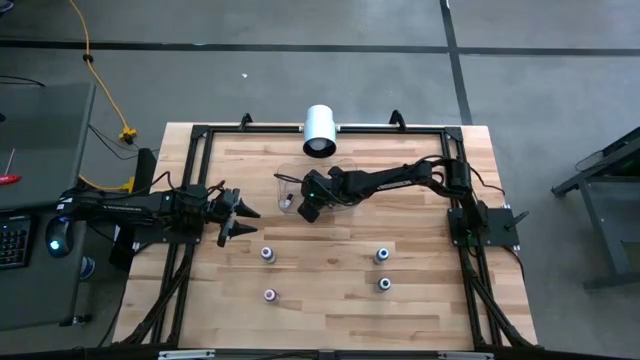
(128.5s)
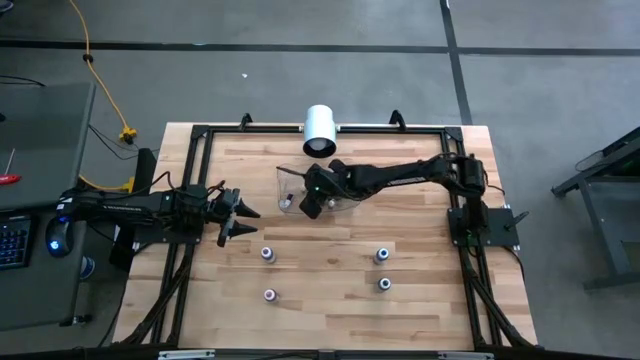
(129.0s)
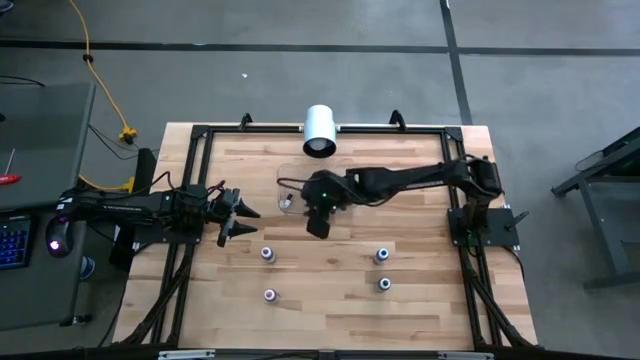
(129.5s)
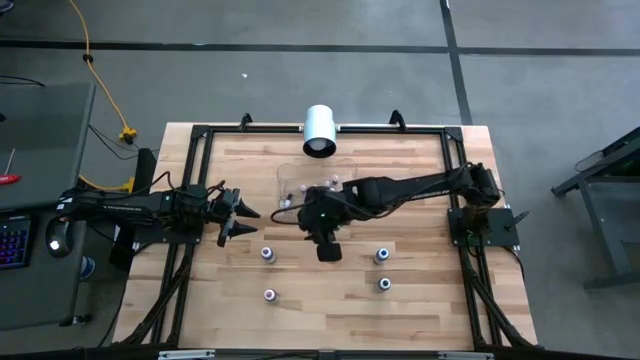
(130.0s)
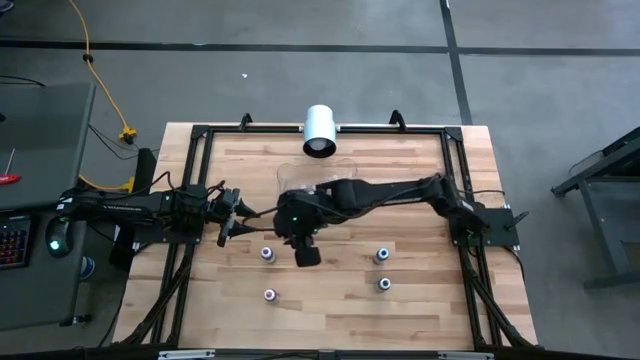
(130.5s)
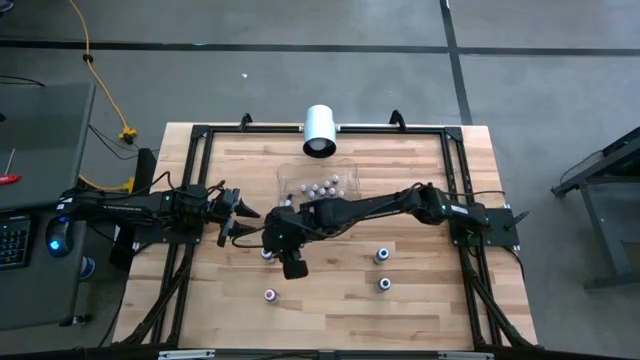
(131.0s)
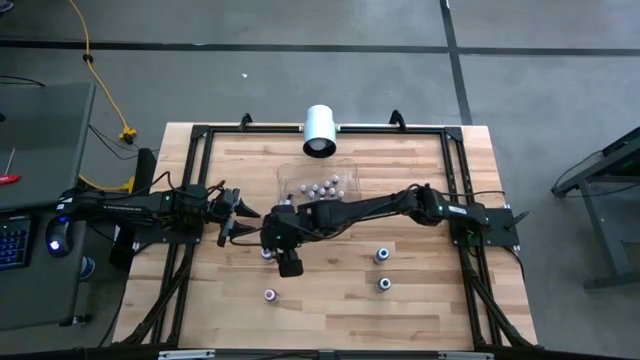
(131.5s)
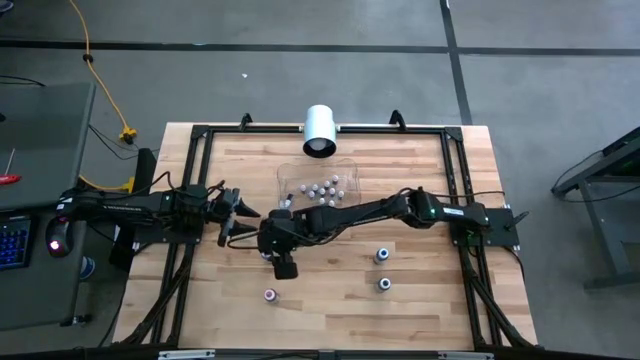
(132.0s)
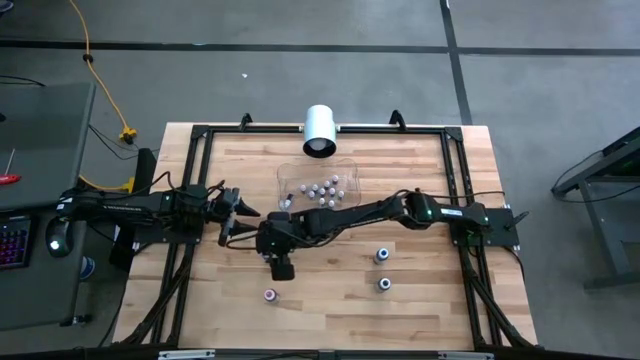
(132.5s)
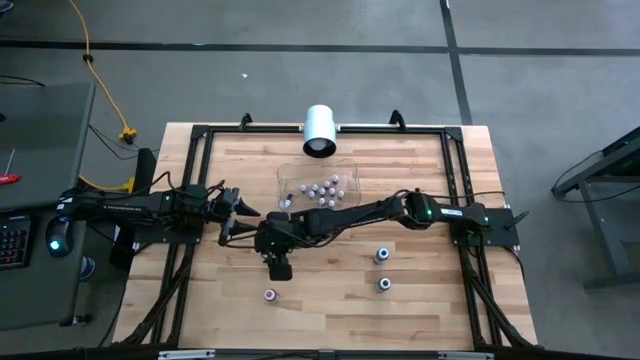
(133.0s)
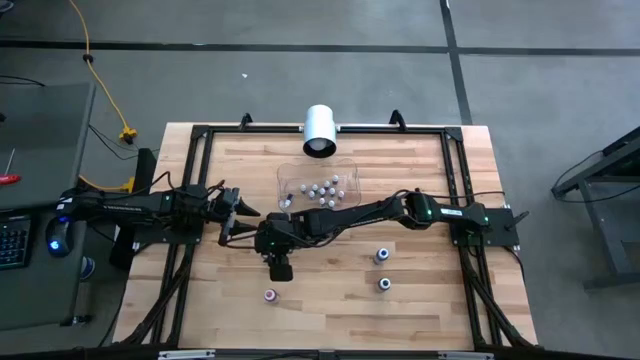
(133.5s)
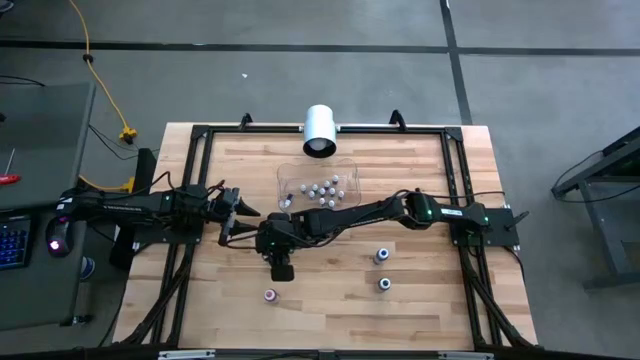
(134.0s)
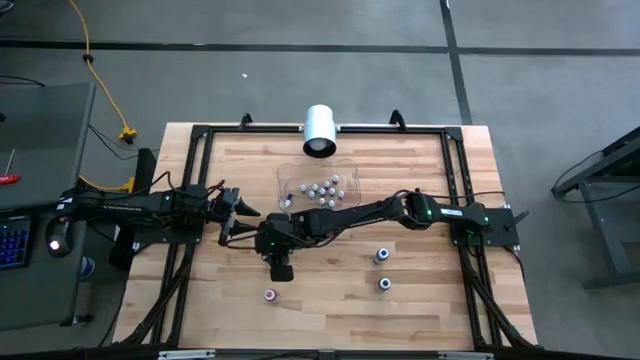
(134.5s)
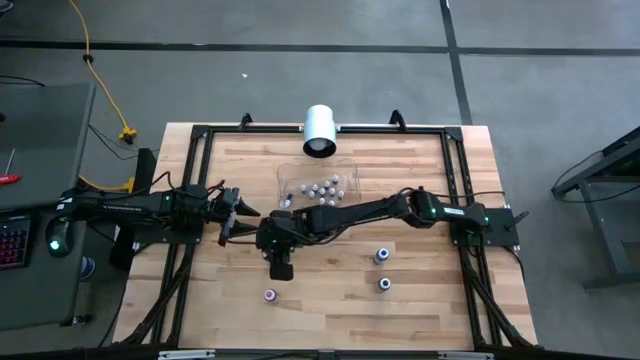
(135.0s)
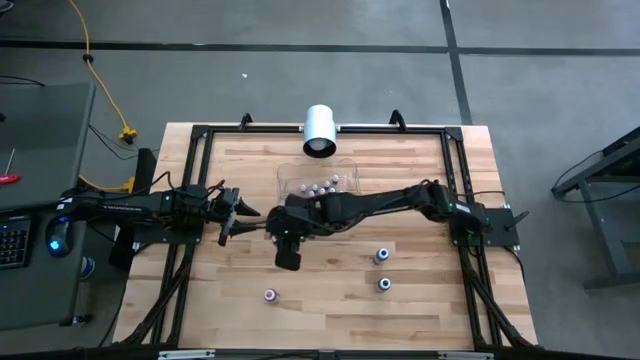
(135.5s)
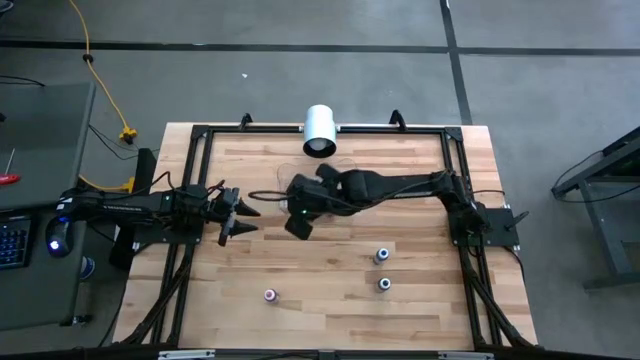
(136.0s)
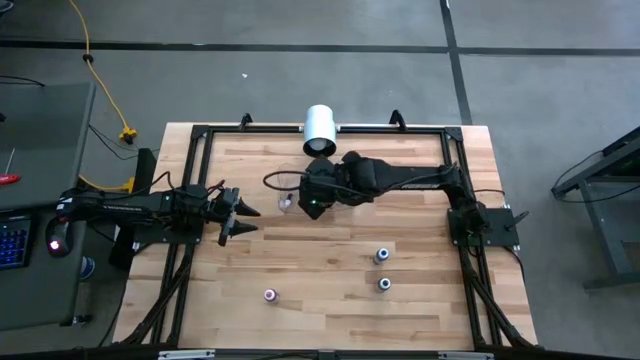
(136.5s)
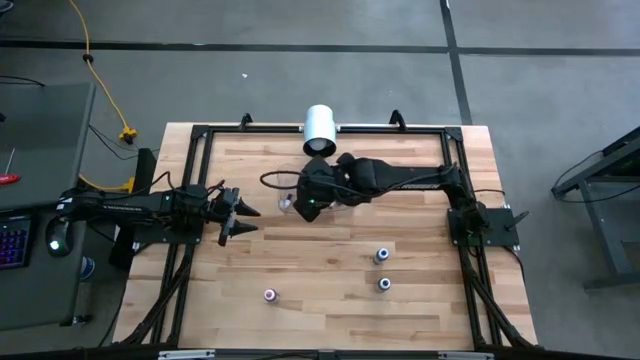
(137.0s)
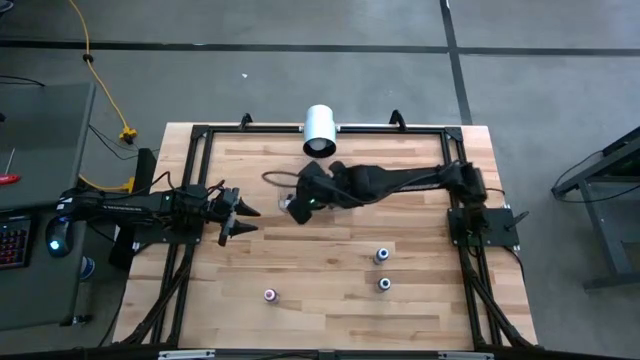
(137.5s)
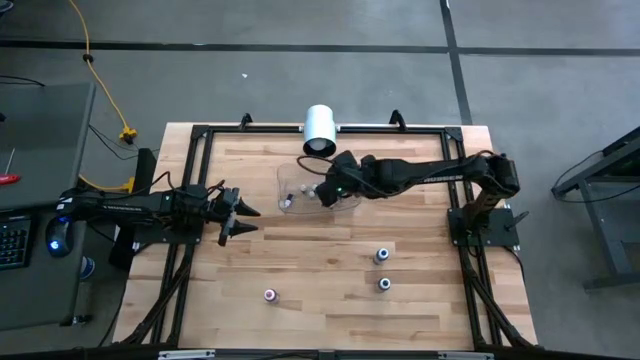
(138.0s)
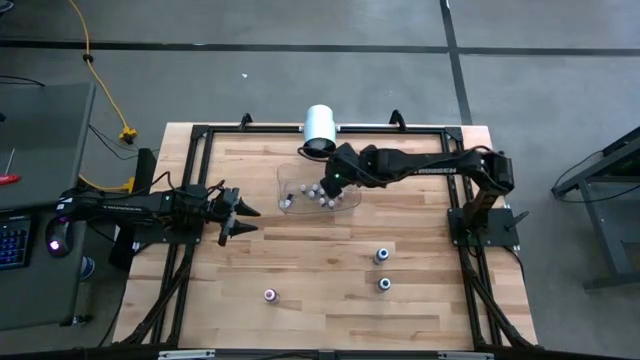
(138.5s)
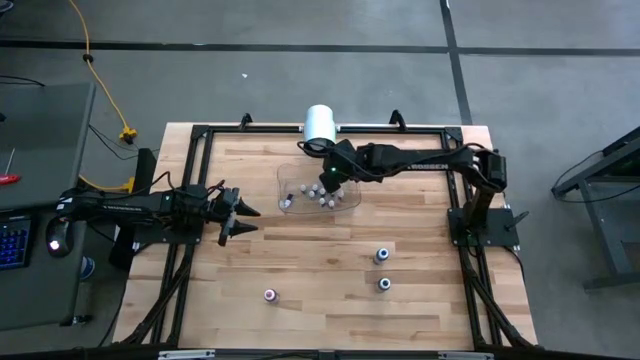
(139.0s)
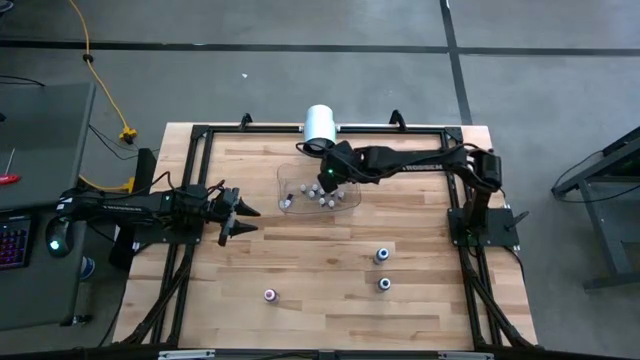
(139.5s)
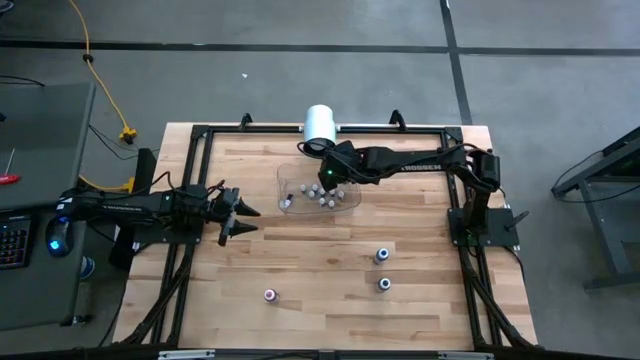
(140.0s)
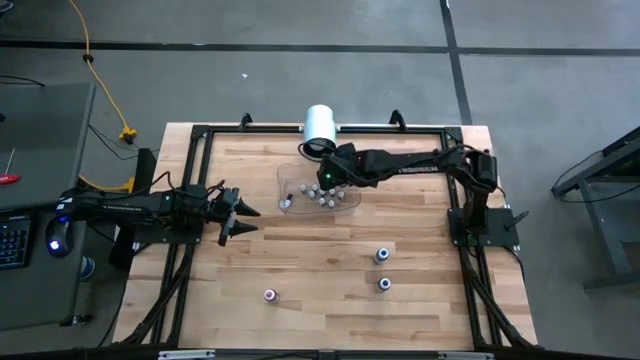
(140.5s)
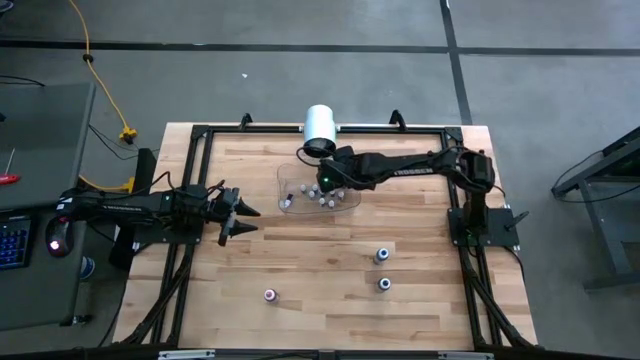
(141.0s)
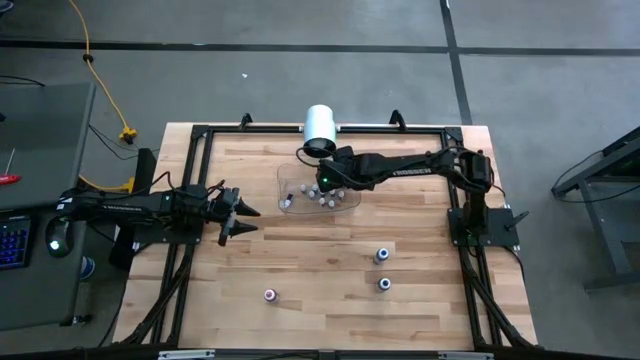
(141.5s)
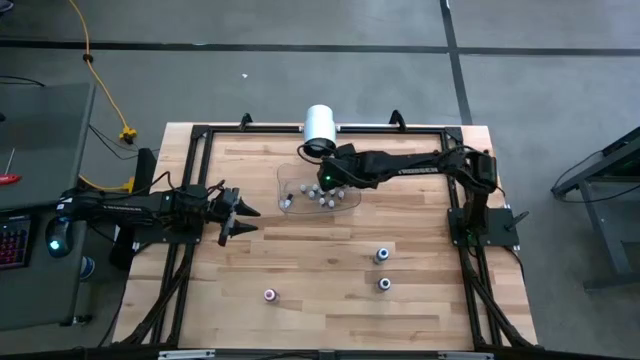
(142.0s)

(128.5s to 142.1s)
Task: Pick & Place food coloring
Put the large purple food coloring bottle into the transparent bin

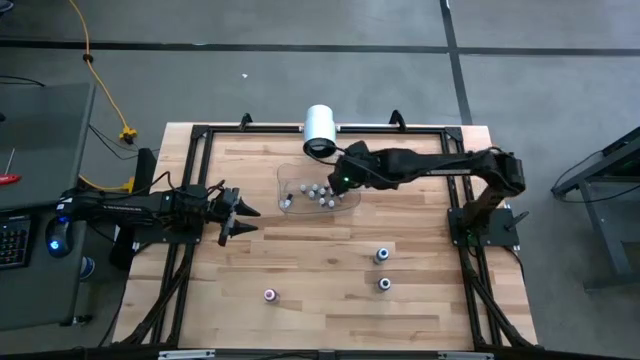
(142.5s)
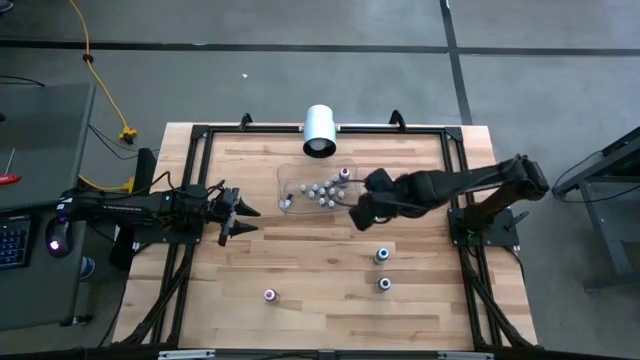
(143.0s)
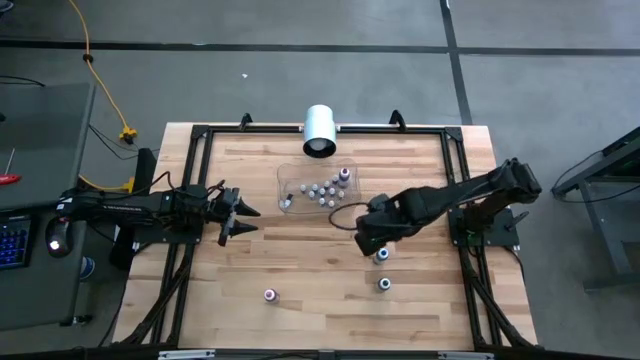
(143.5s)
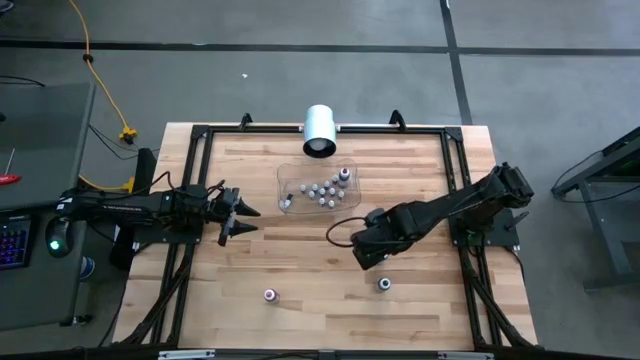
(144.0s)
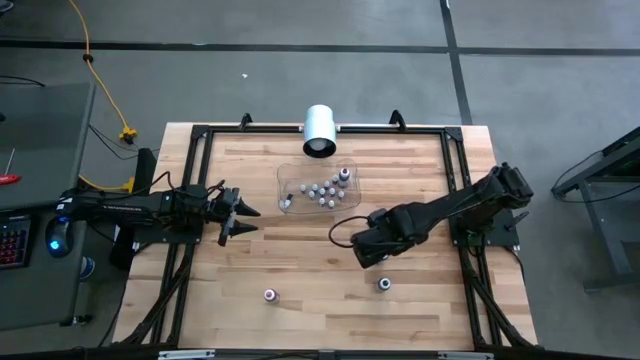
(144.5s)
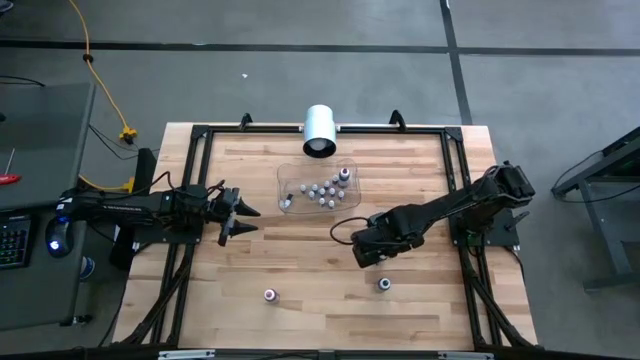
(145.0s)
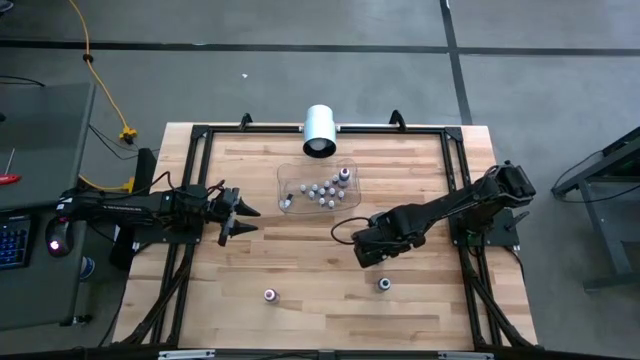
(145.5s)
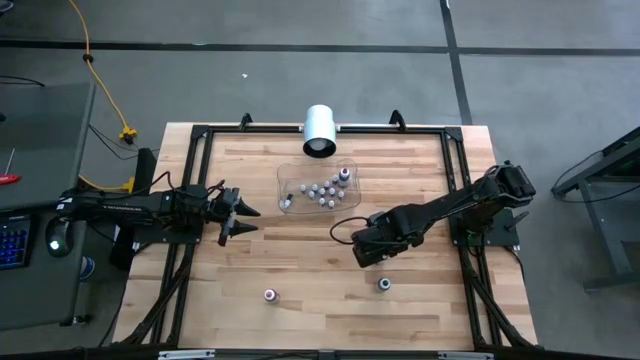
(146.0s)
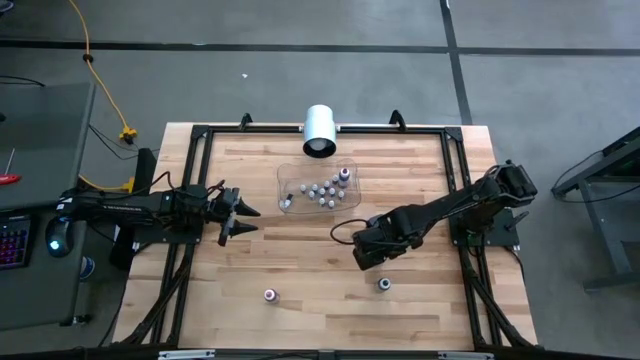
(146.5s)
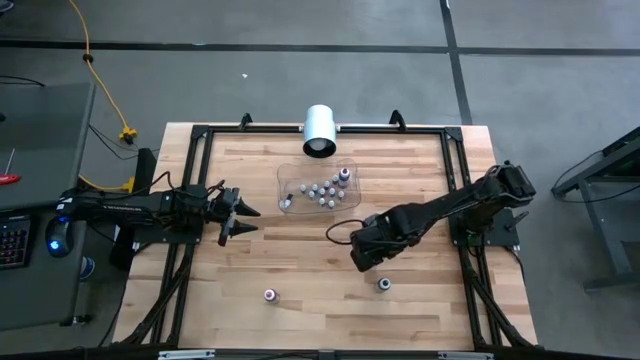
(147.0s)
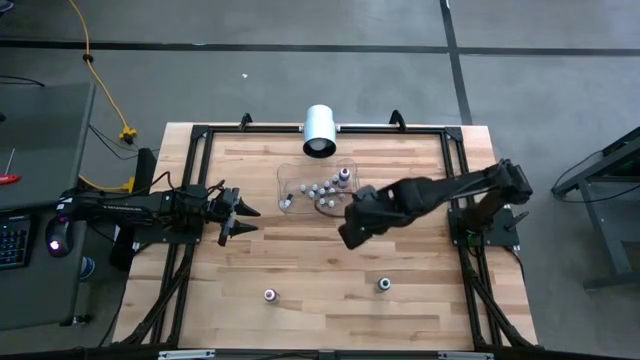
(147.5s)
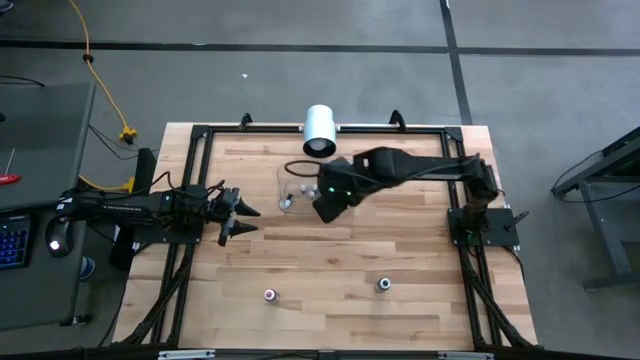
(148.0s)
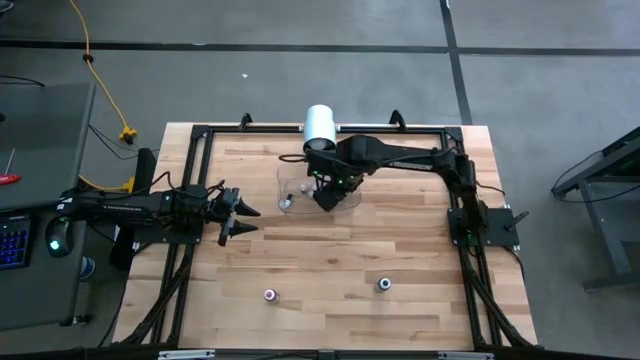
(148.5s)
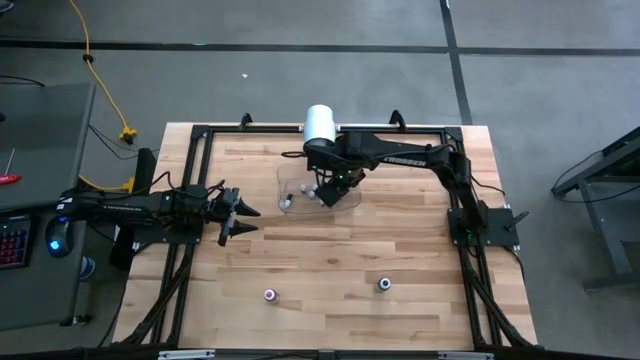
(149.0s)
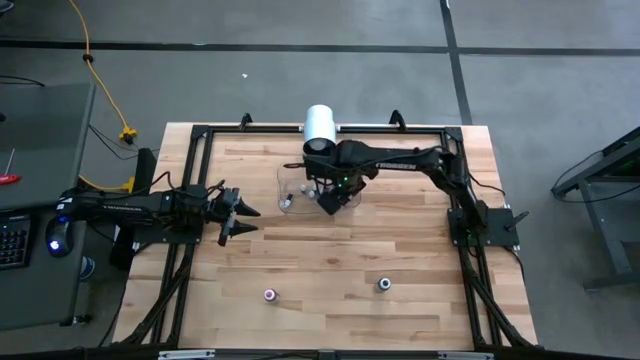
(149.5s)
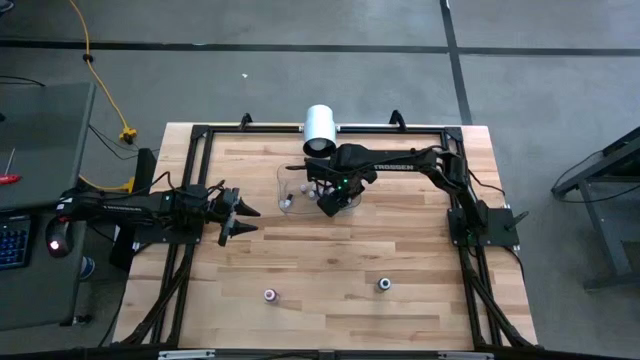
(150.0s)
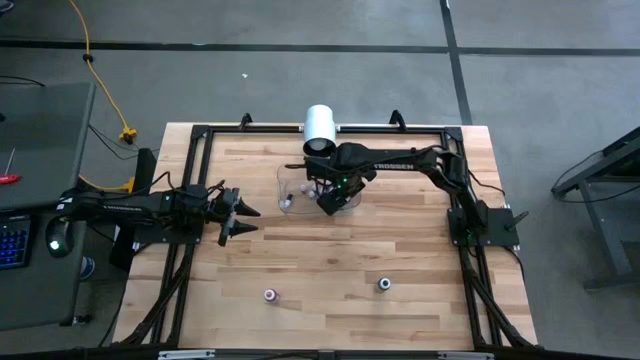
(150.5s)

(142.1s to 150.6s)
Put the large blue food coloring bottle into the transparent bin

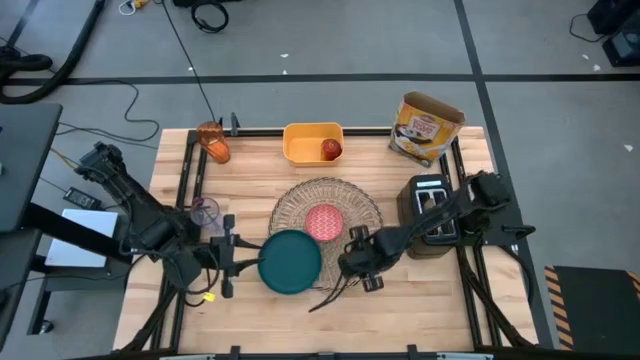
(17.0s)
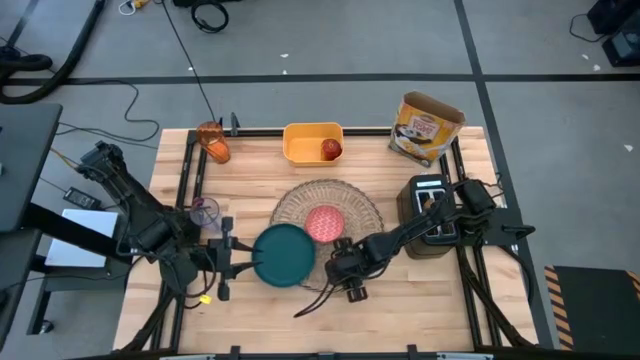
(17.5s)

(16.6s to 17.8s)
Task: Arrange a breakfast setting
Adjust the brown table mat on the table
